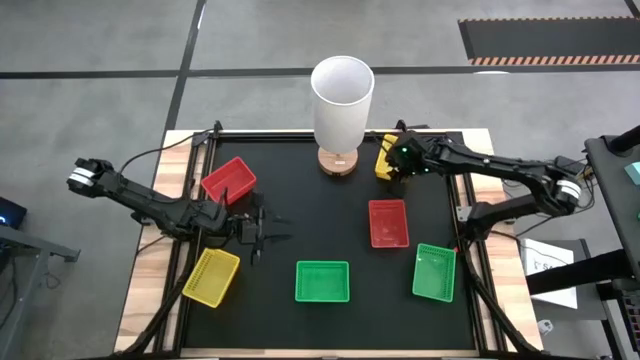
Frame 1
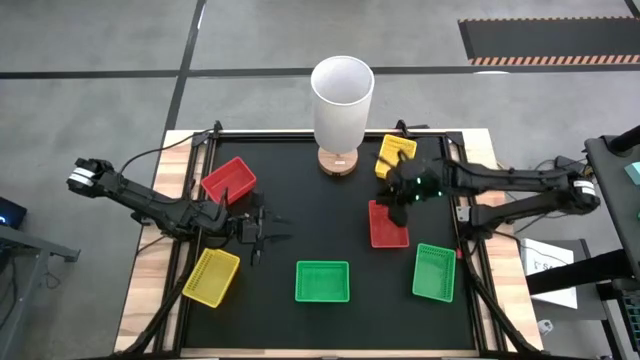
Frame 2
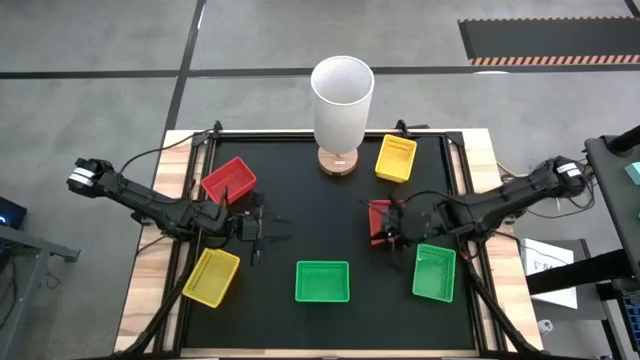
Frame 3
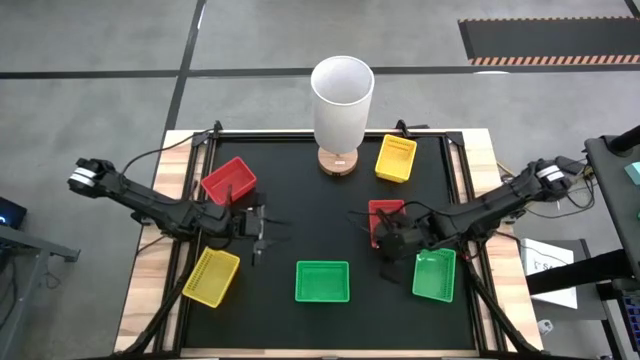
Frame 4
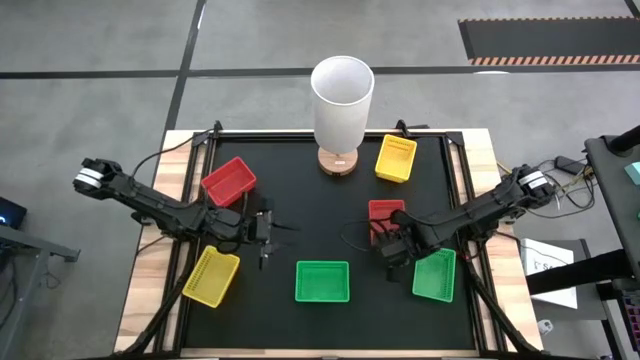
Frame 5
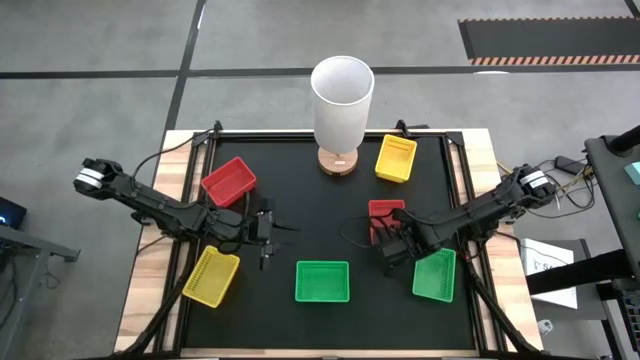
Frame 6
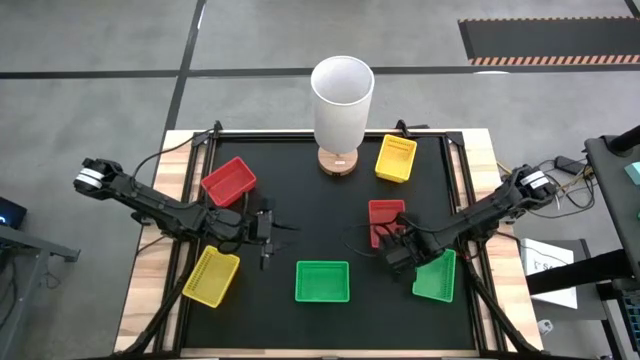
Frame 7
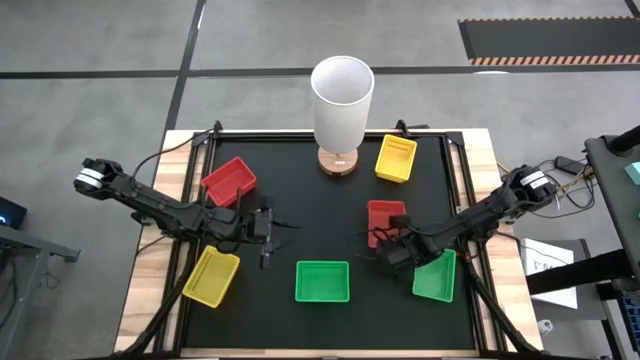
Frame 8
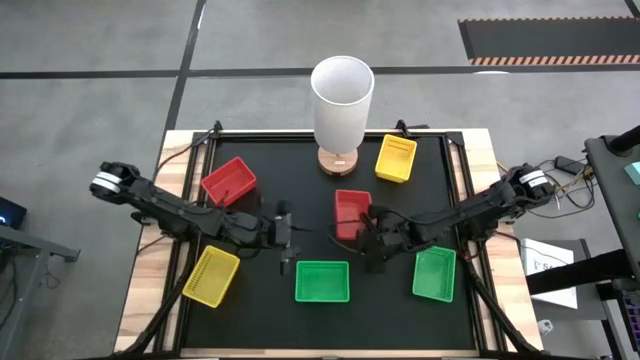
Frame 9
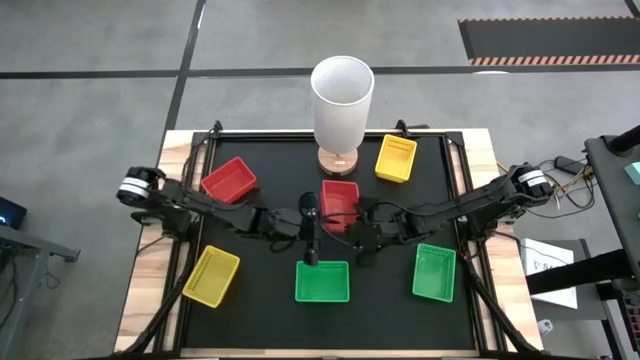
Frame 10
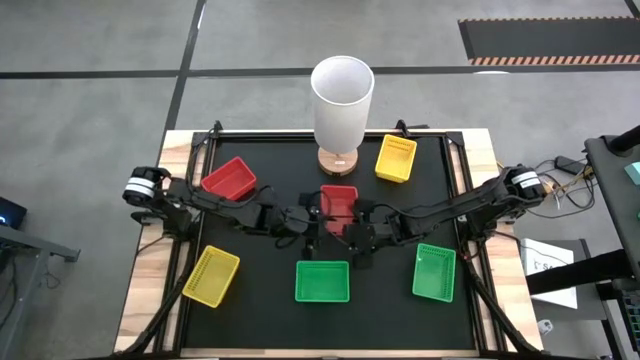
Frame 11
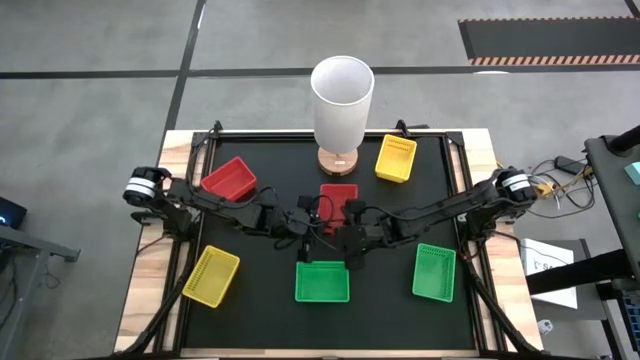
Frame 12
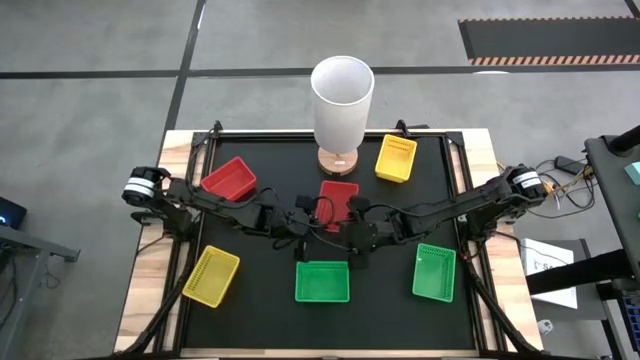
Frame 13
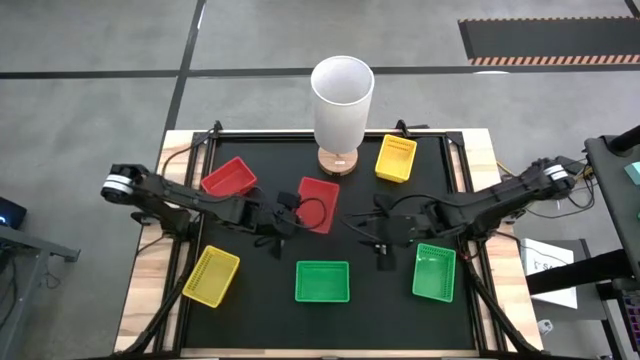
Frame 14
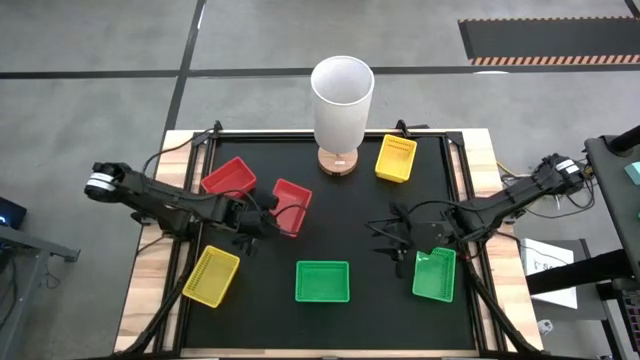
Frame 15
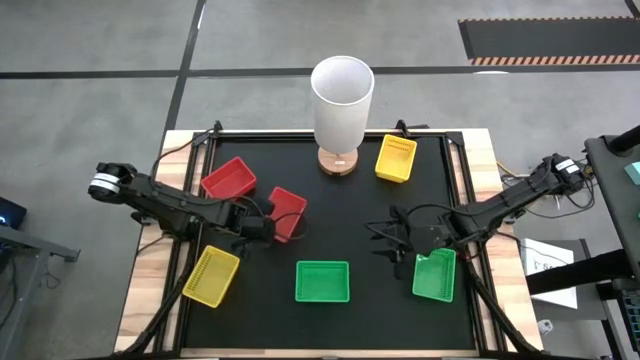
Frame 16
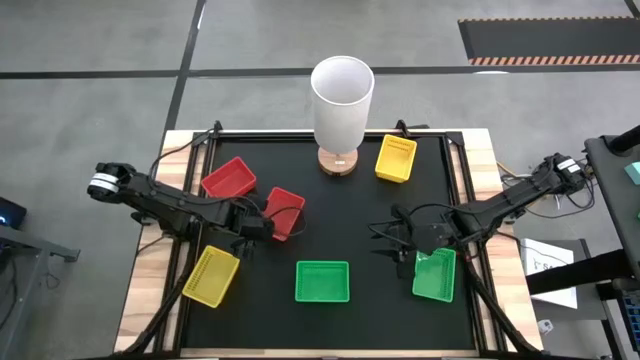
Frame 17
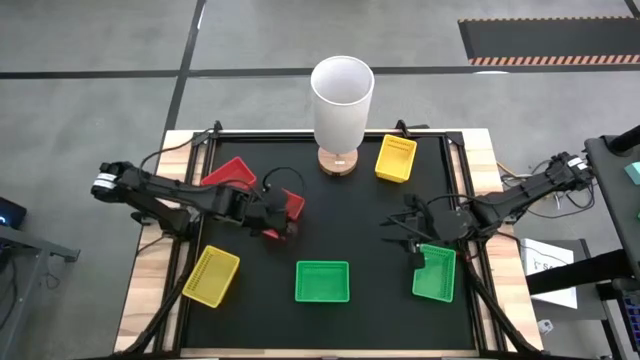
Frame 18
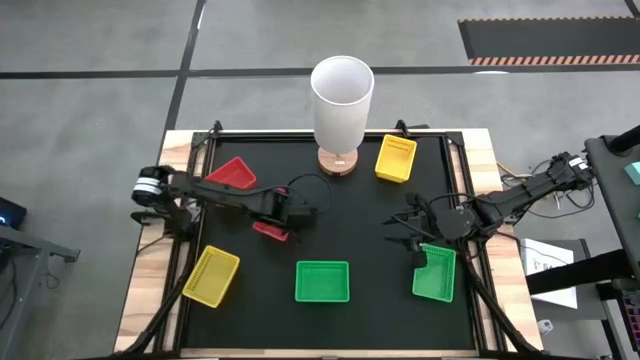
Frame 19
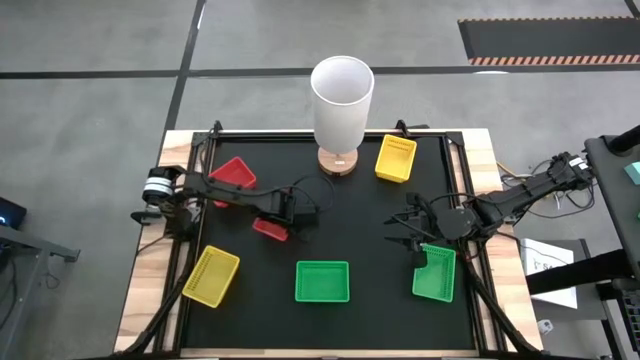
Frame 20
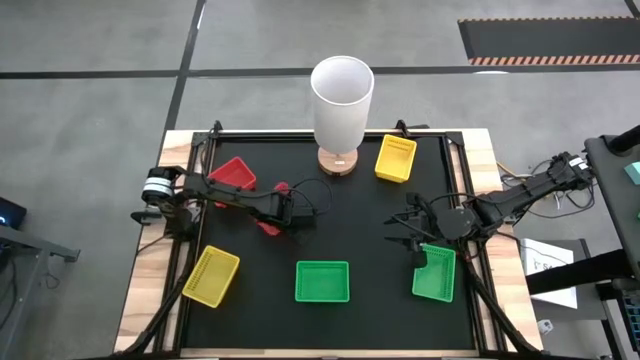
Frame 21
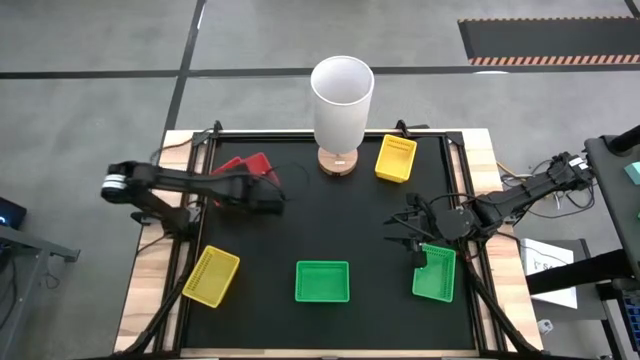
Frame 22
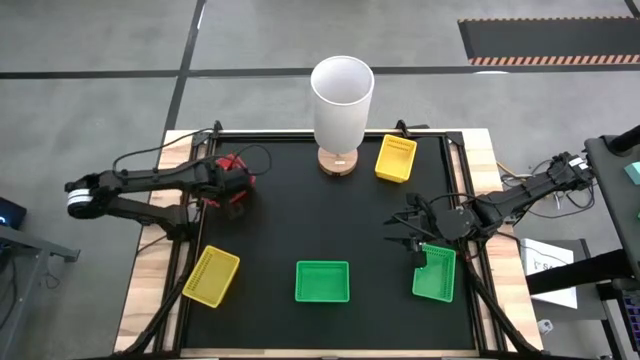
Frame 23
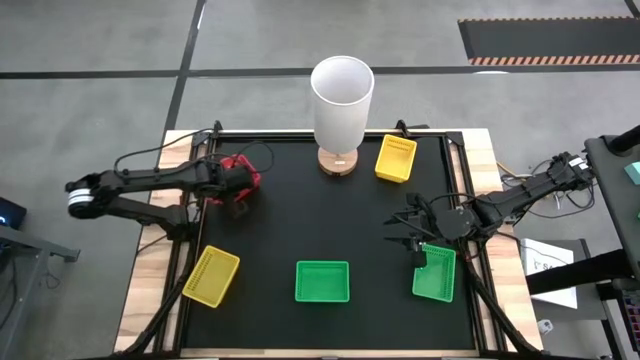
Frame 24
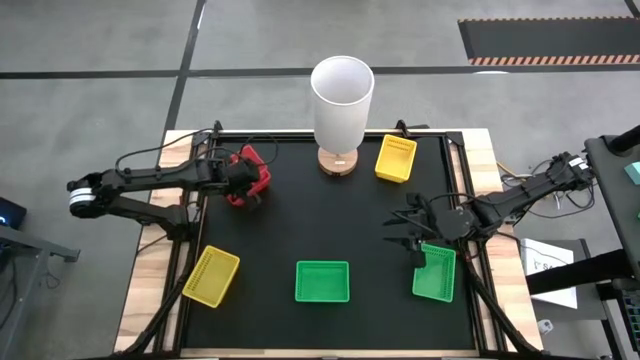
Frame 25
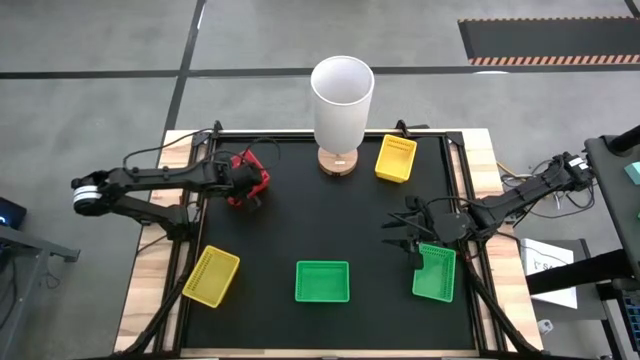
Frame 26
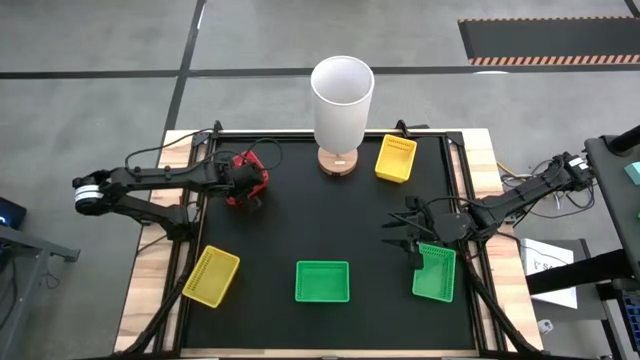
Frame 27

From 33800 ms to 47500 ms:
Stack the bottom red bin on the stacked red bins

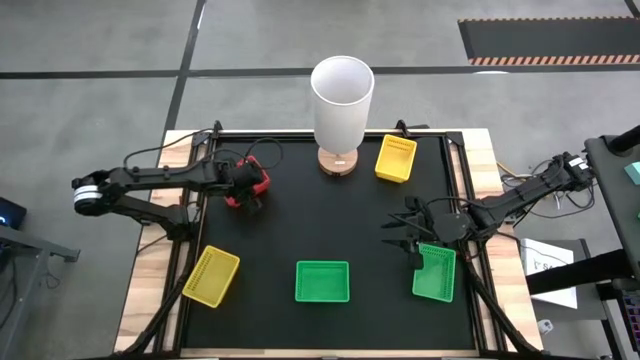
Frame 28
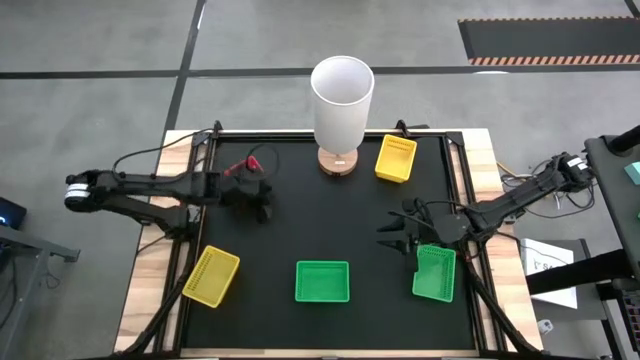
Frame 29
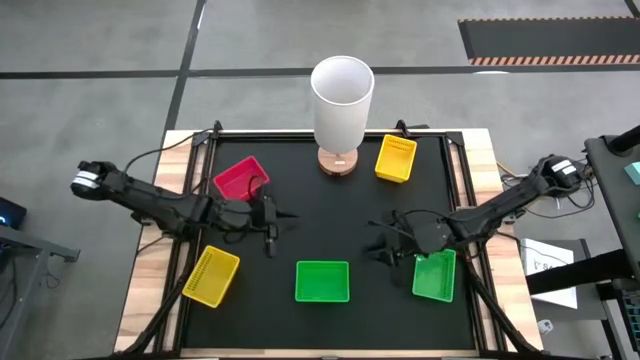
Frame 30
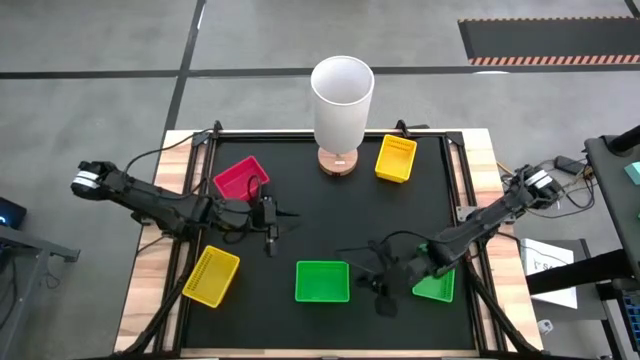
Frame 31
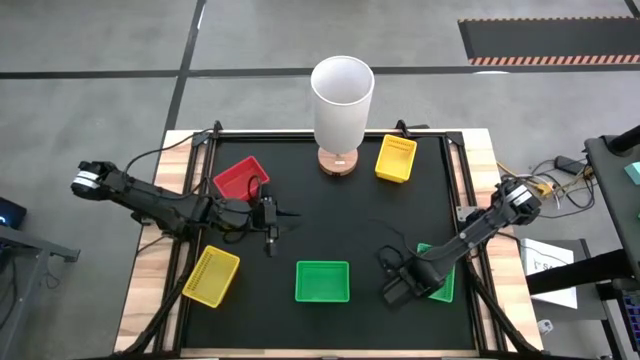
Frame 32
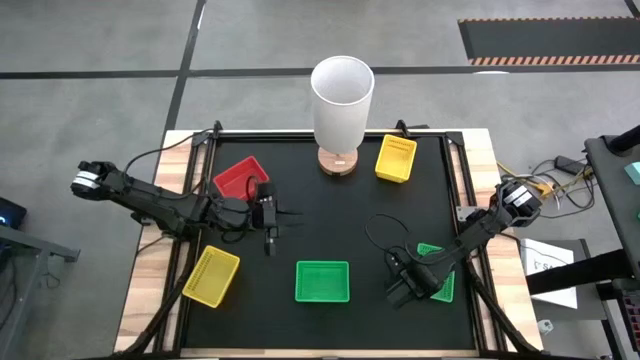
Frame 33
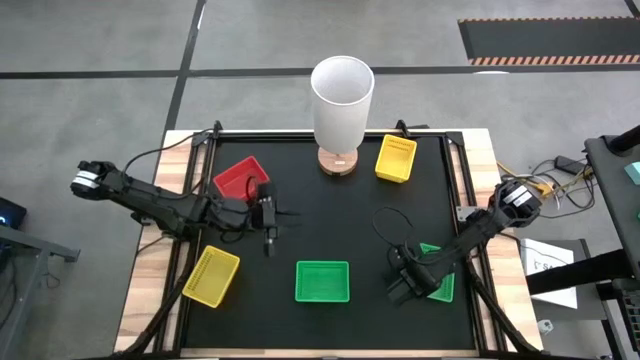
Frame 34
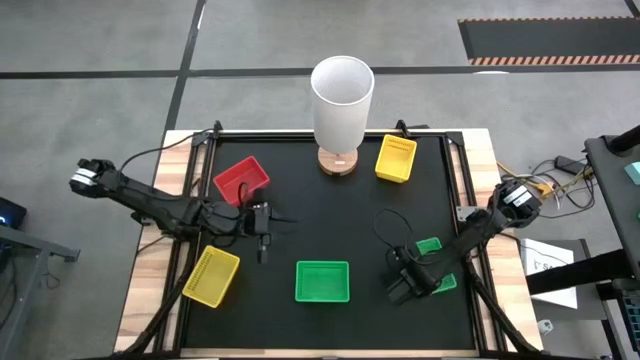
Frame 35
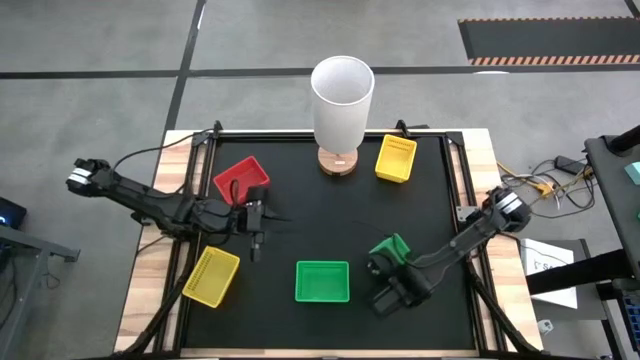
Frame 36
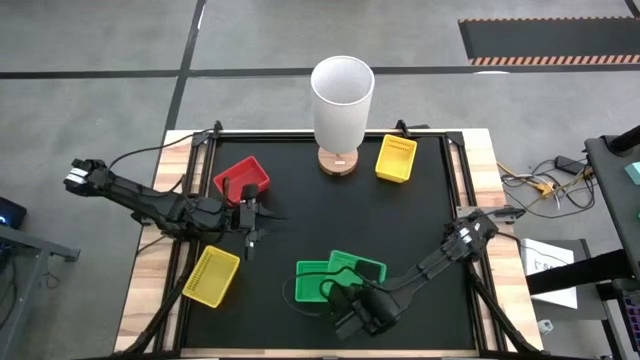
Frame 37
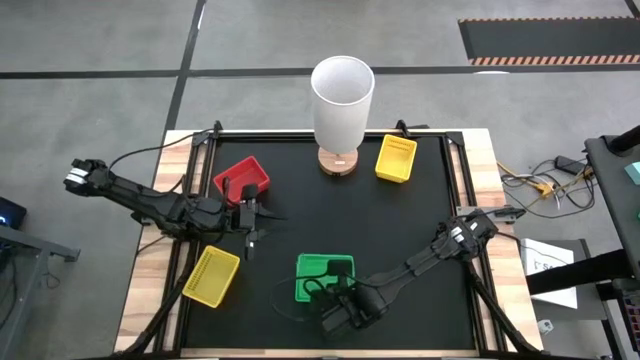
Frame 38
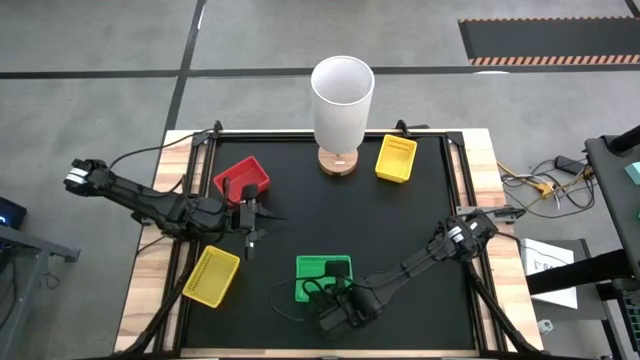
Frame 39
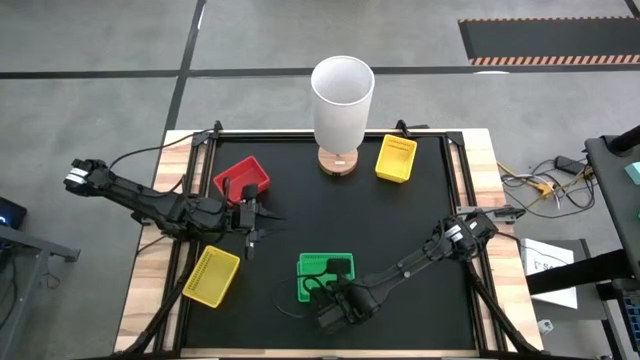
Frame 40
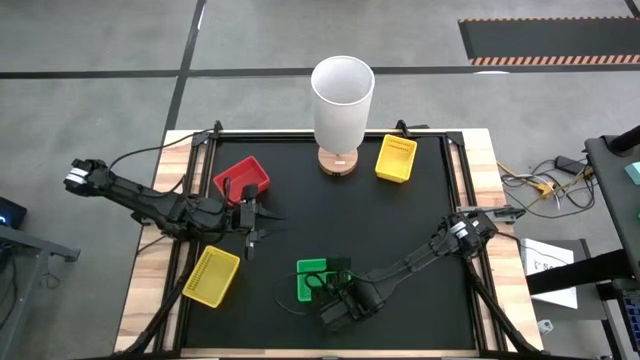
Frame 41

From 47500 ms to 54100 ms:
Stack the right green bin on the stacked green bins
